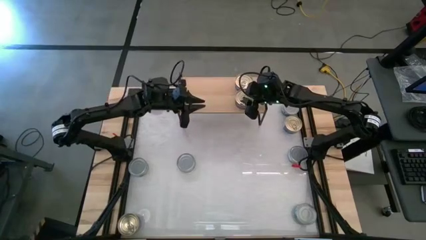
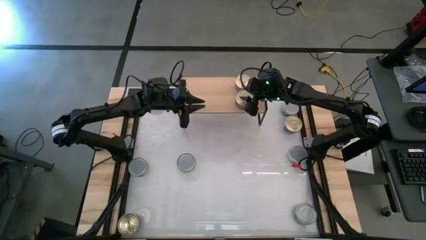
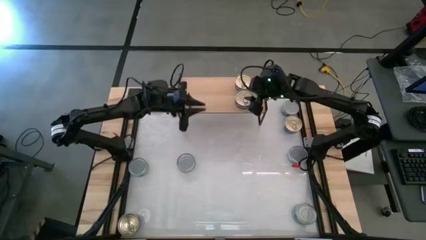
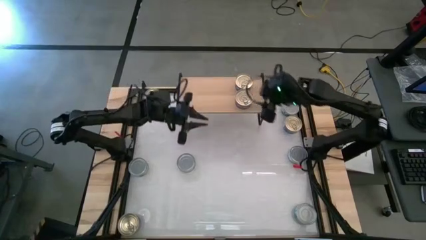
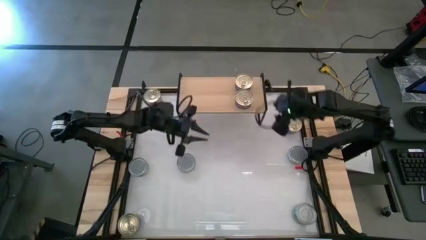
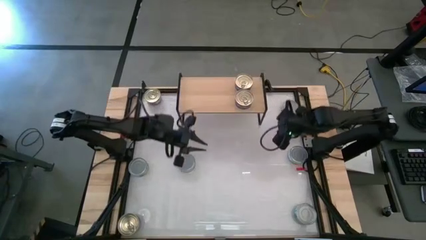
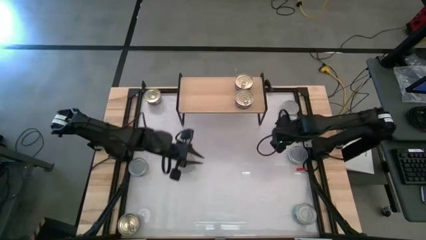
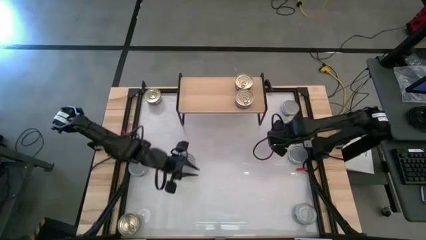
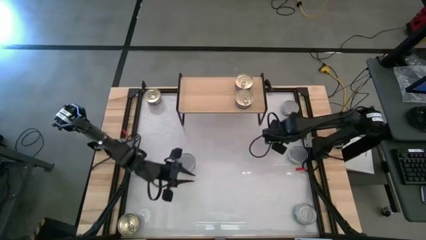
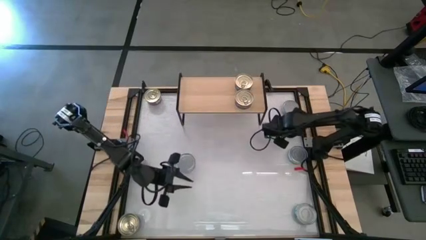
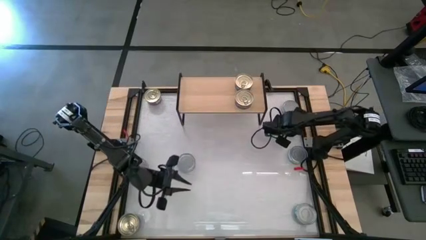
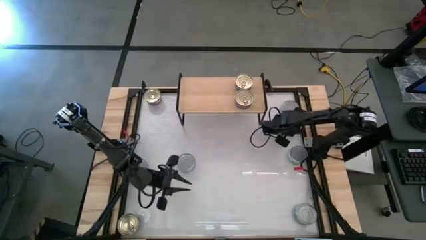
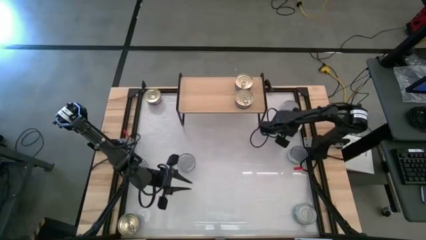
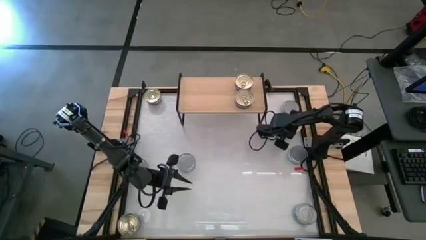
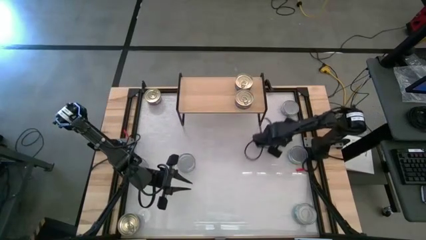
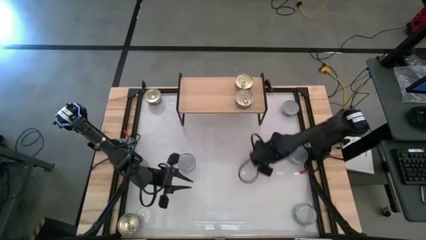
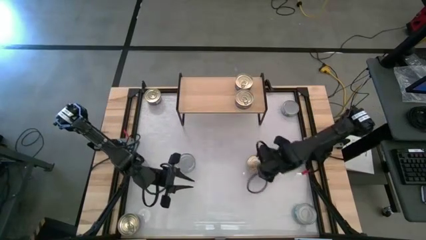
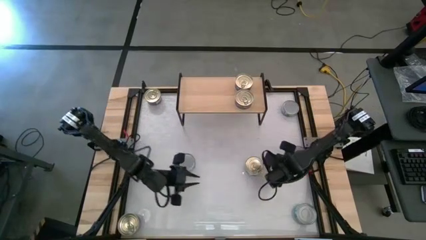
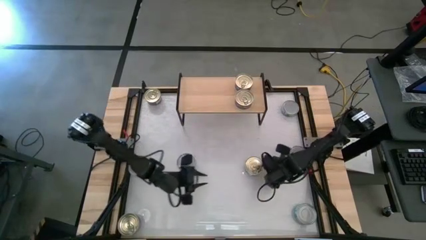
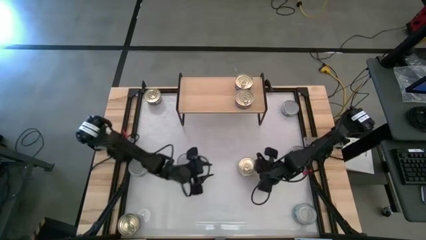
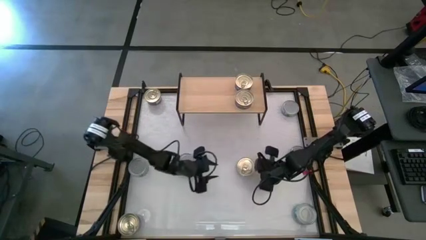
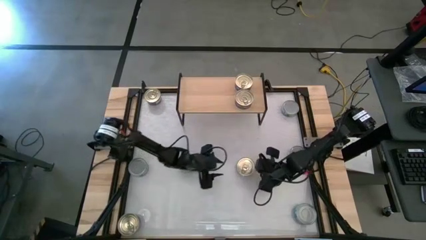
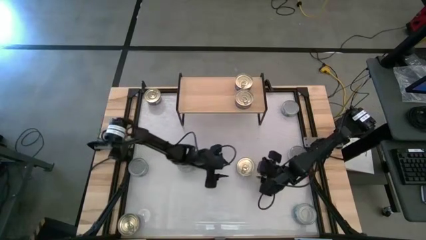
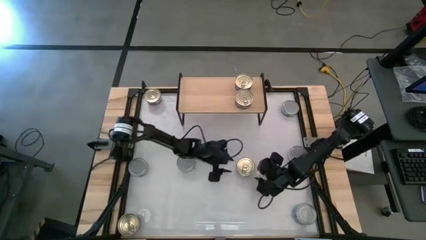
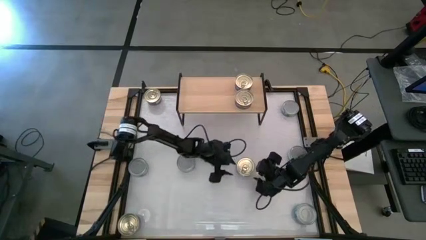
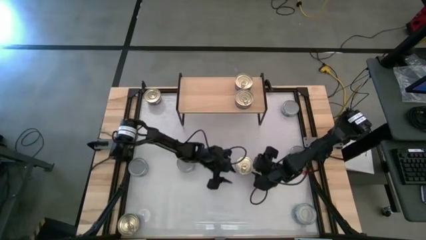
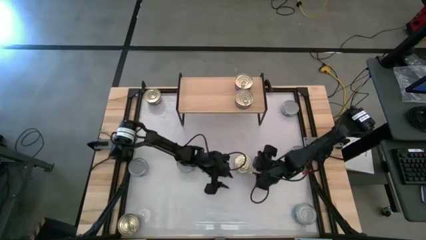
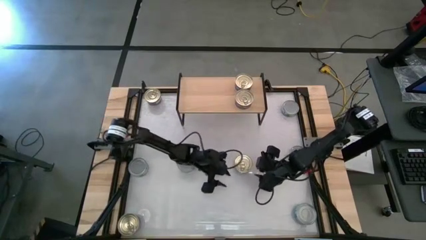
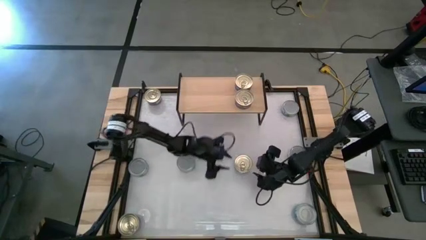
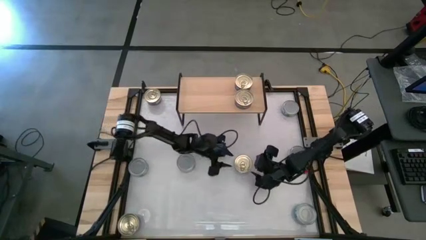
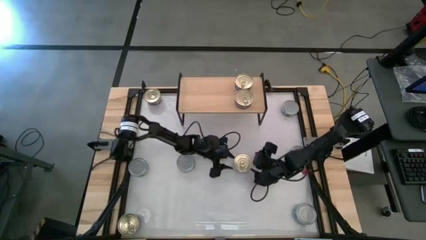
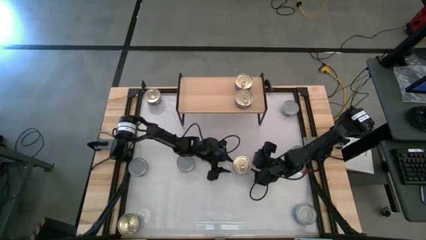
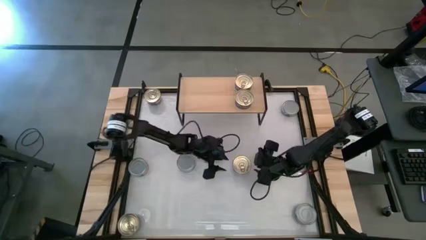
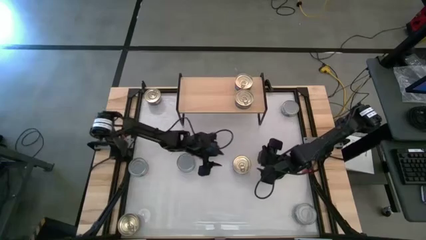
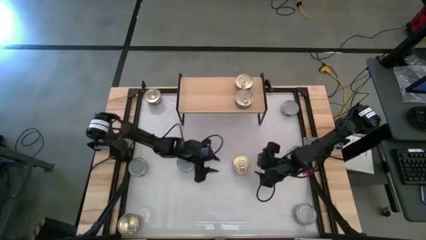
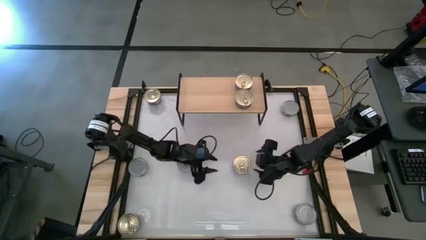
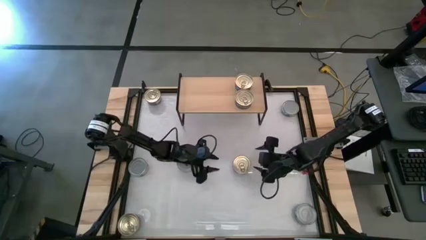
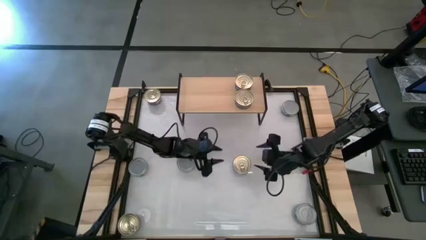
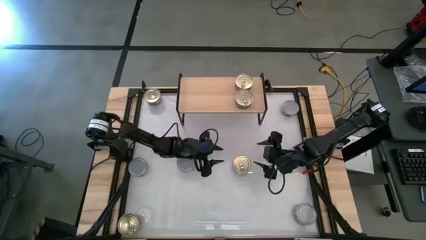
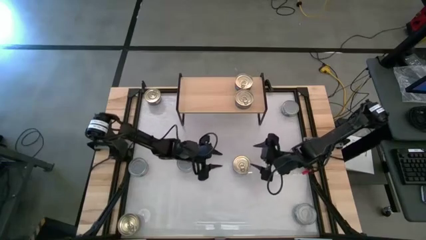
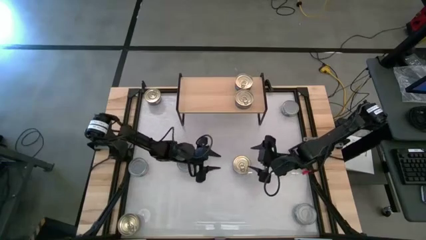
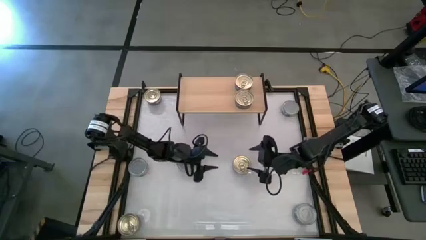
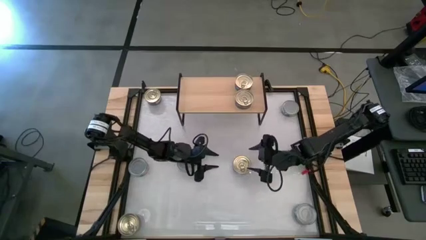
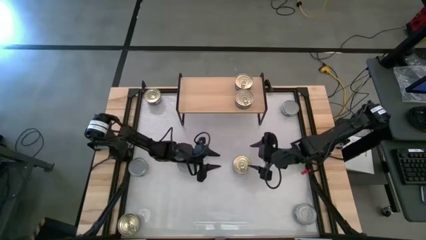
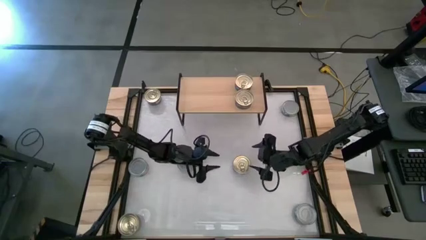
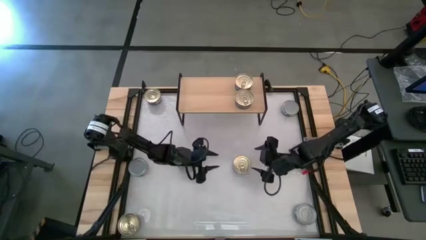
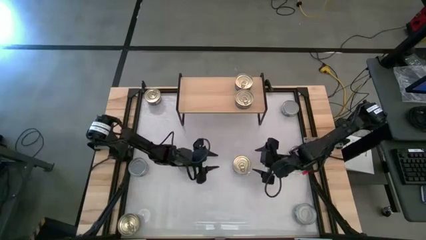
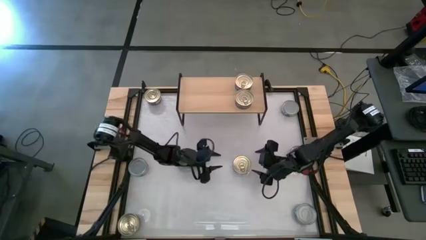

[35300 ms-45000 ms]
Task: Stack canned seafood by type on shelf
Stack the blue-pink tuna can on top of the other blue-pink tuna can on the shelf

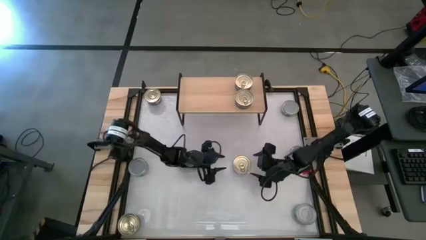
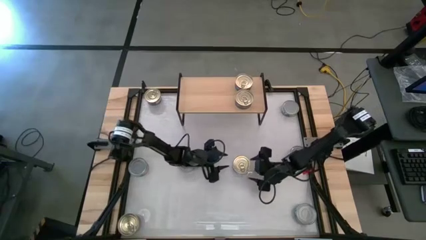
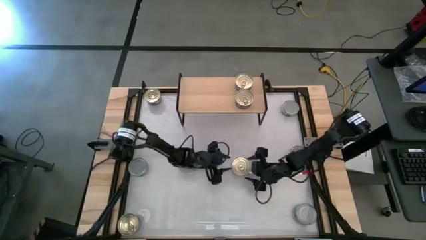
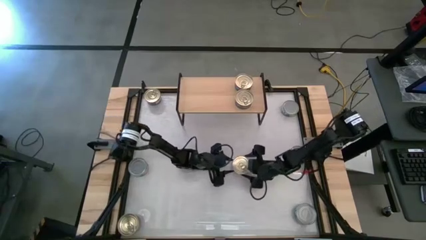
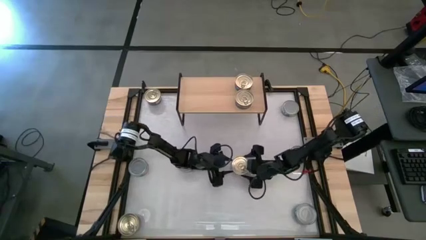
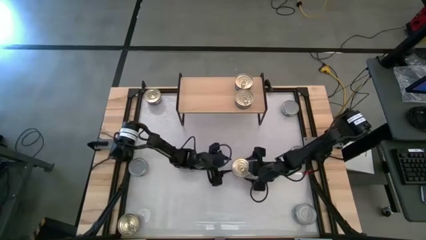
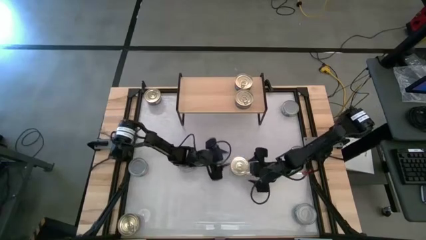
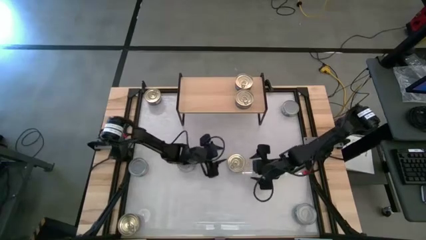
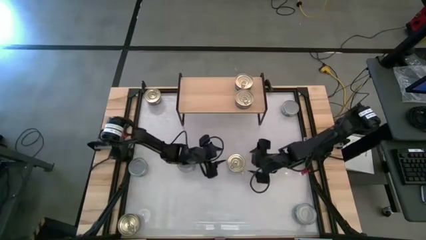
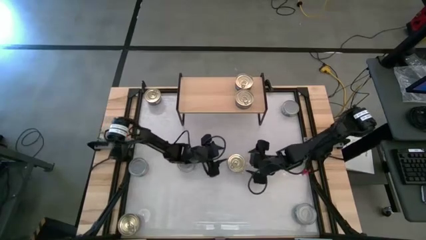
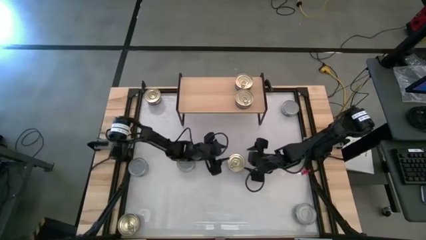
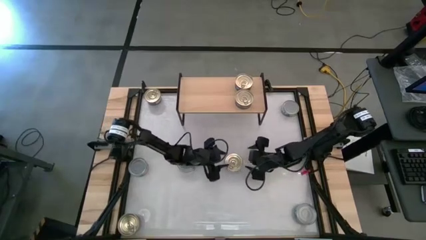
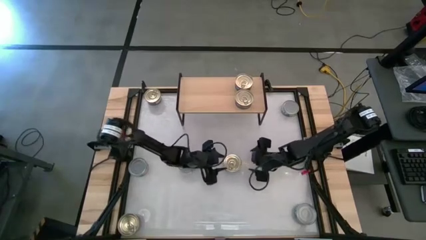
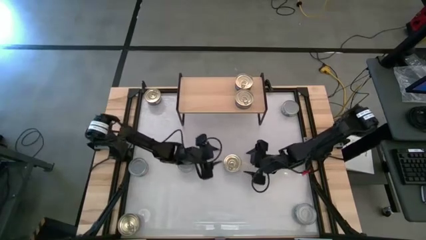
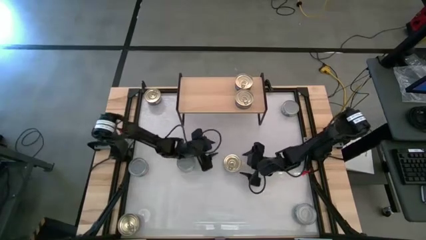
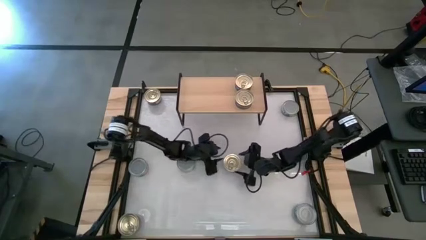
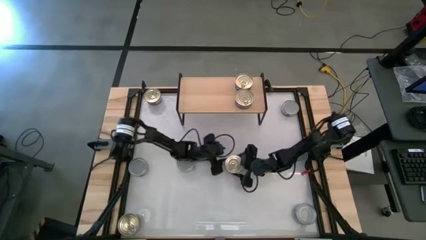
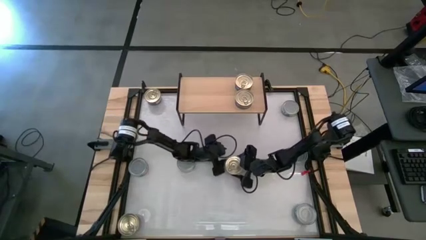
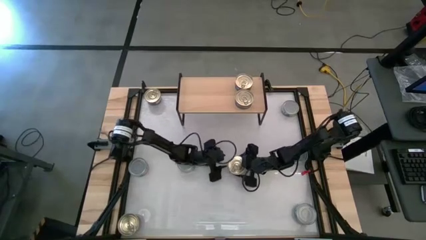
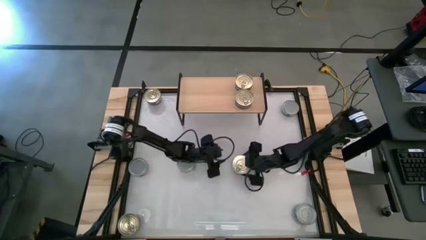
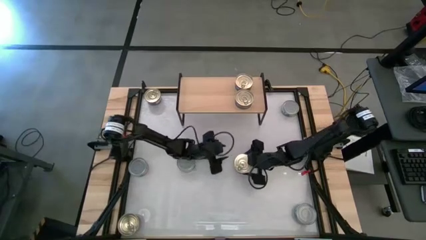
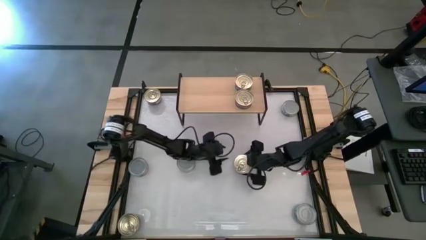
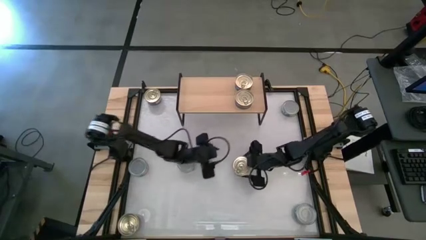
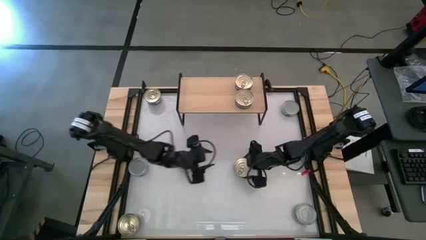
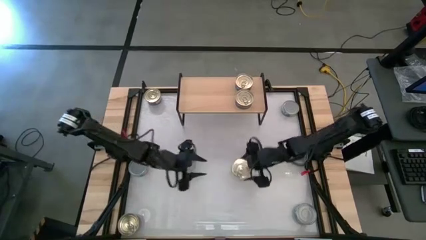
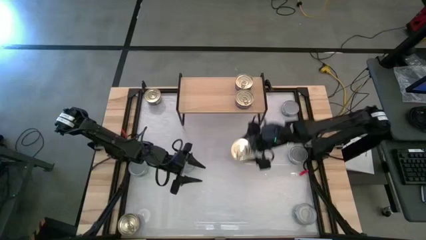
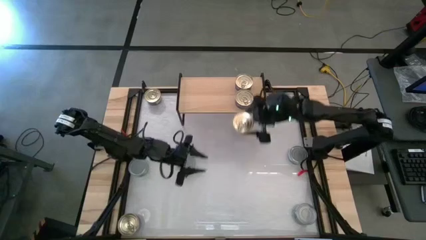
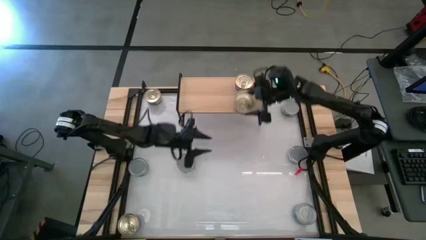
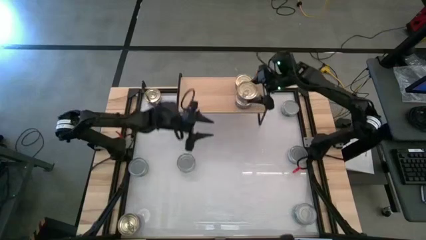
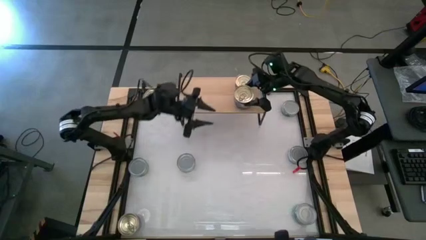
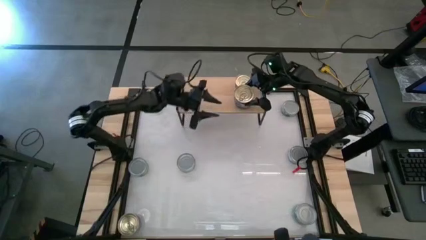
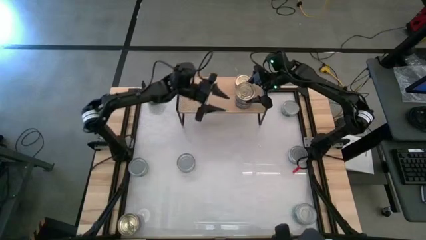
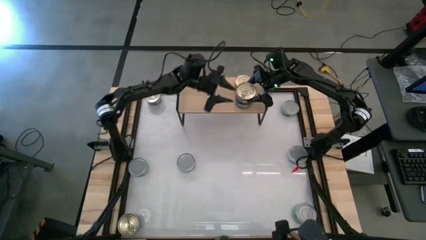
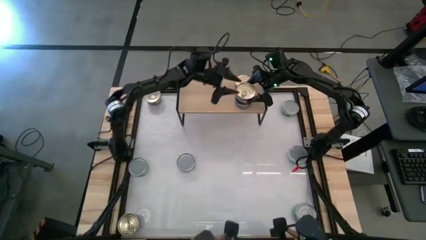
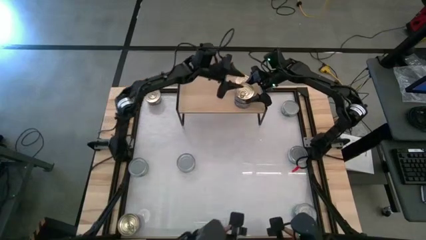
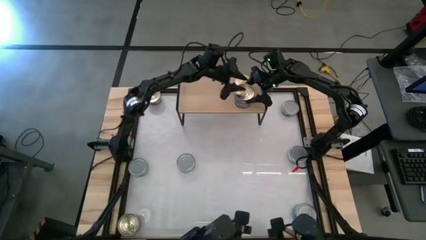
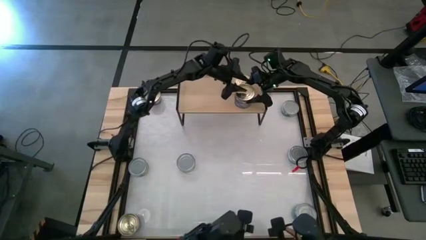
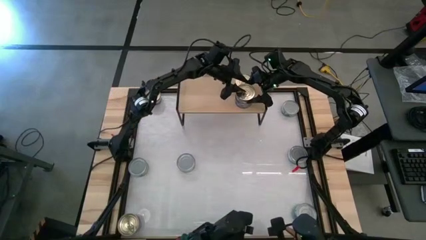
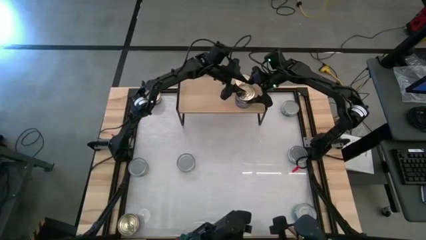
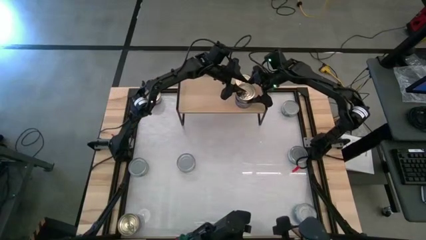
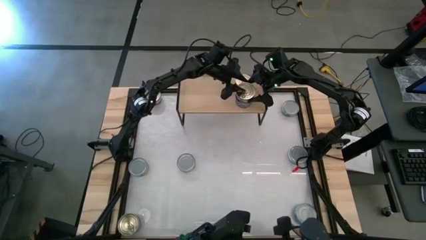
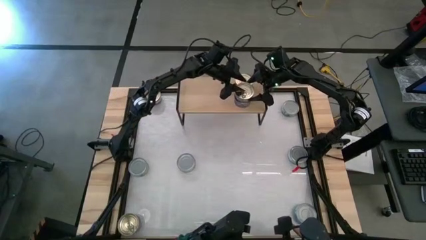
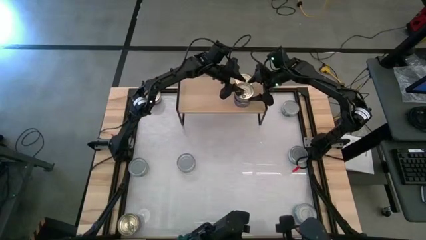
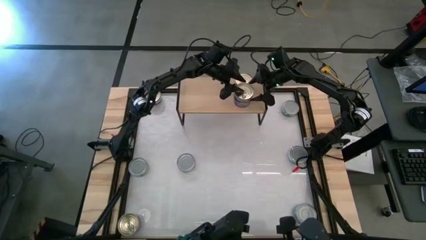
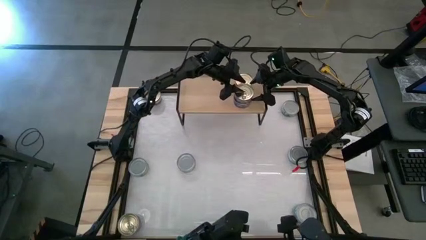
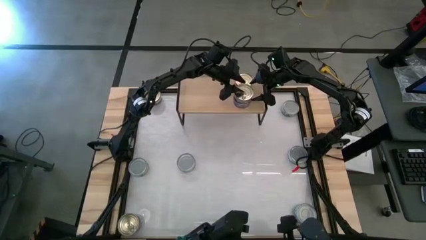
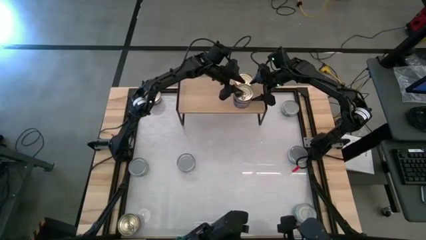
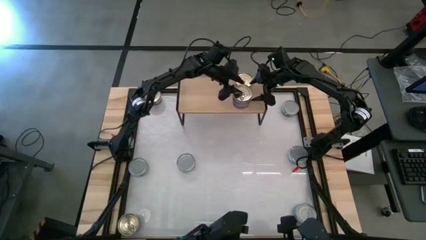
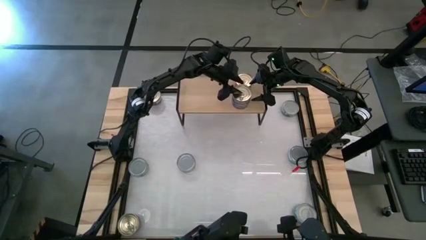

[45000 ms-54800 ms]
Stack the blue-pink tuna can on top of the other blue-pink tuna can on the shelf
